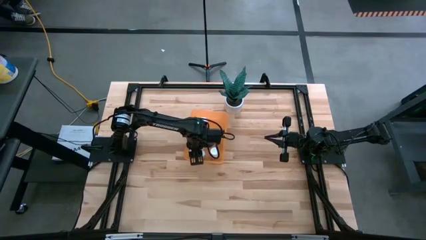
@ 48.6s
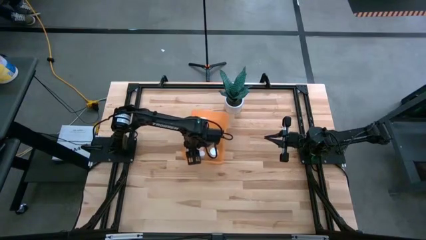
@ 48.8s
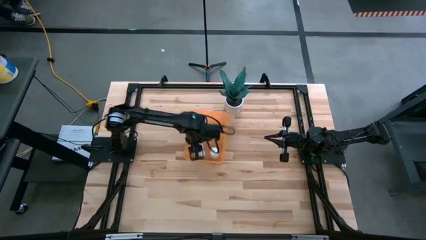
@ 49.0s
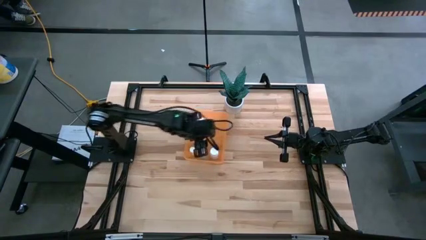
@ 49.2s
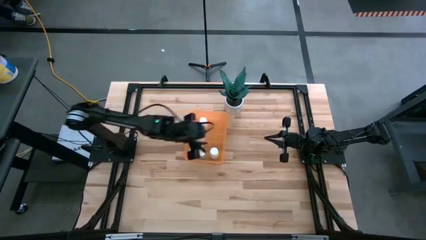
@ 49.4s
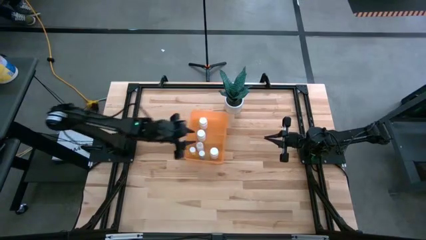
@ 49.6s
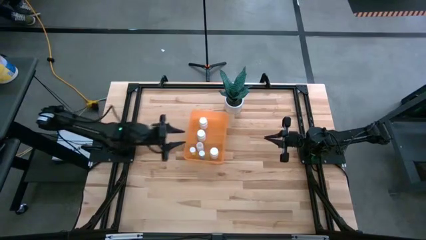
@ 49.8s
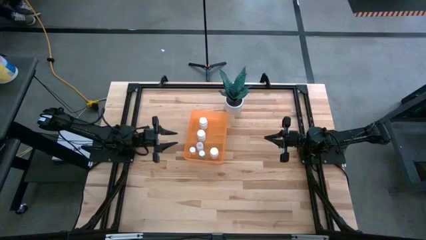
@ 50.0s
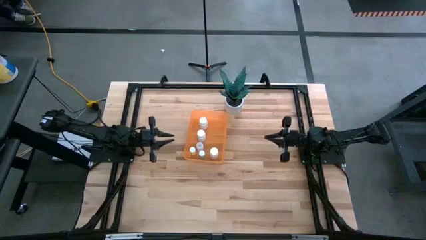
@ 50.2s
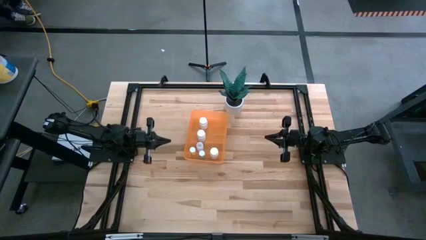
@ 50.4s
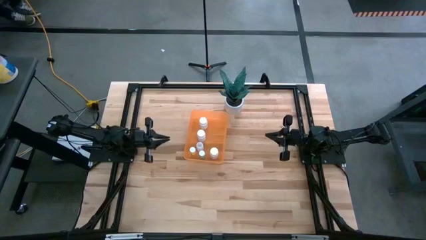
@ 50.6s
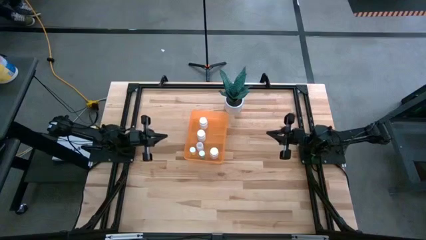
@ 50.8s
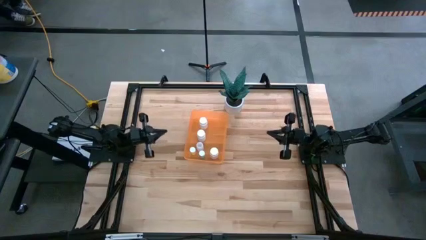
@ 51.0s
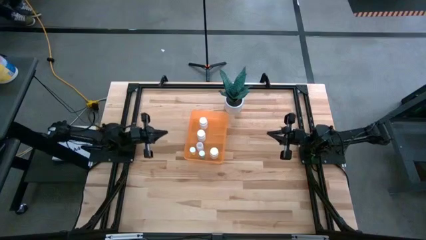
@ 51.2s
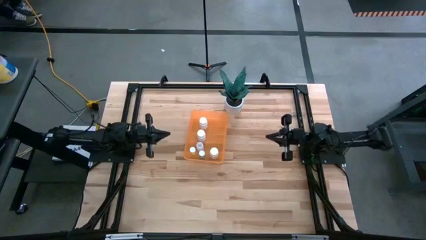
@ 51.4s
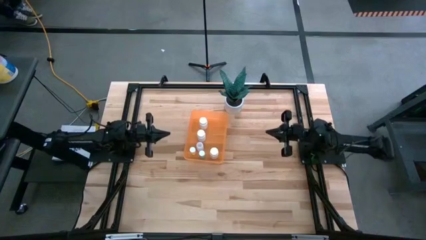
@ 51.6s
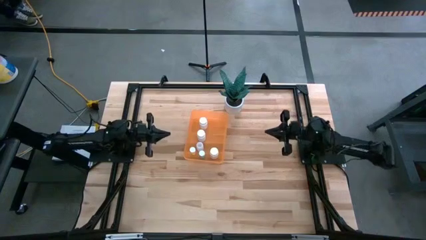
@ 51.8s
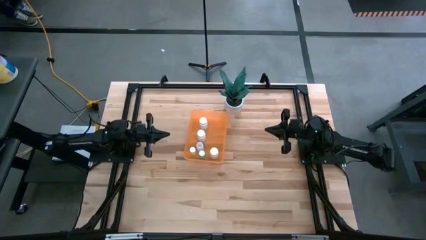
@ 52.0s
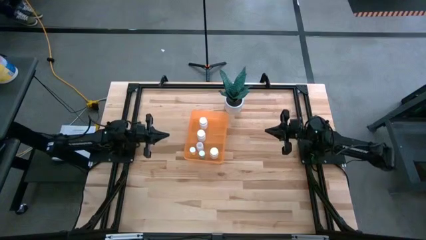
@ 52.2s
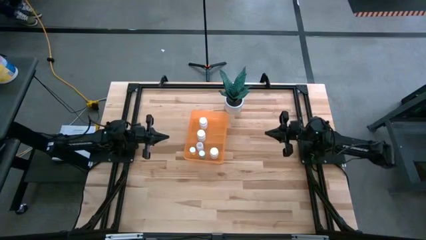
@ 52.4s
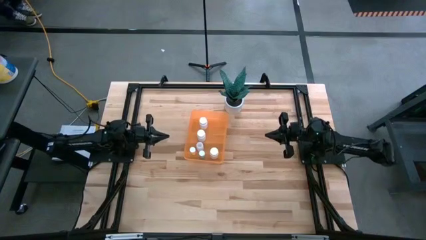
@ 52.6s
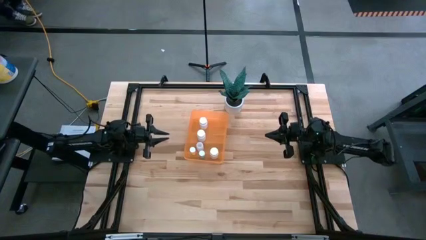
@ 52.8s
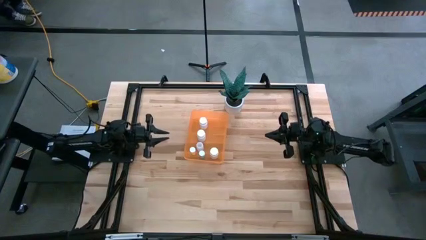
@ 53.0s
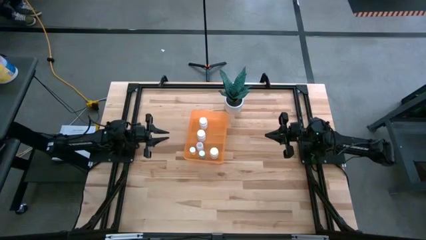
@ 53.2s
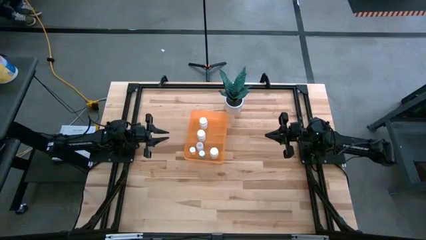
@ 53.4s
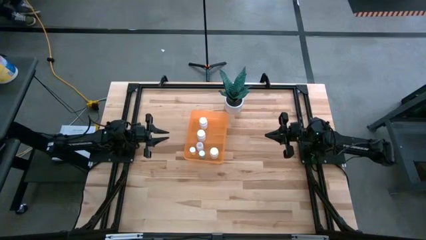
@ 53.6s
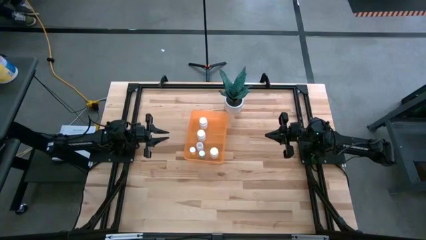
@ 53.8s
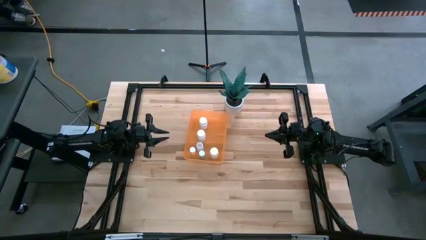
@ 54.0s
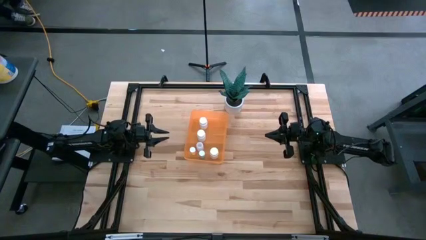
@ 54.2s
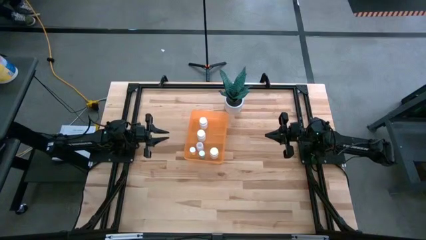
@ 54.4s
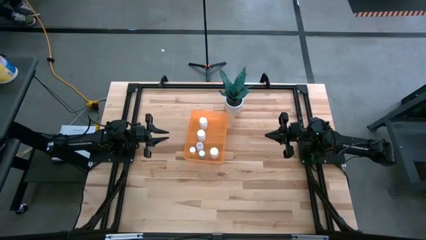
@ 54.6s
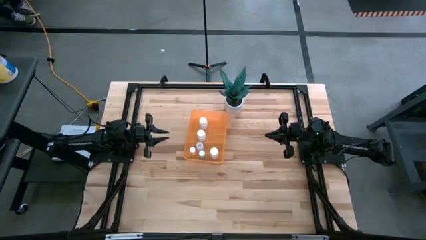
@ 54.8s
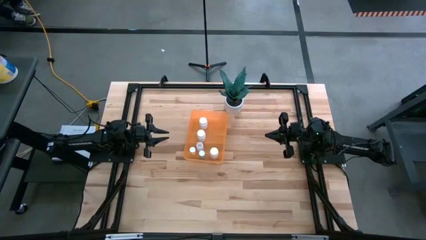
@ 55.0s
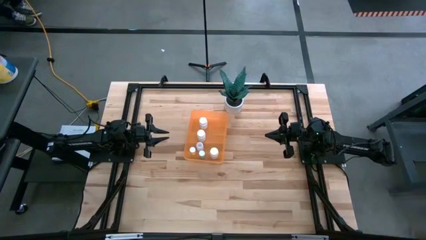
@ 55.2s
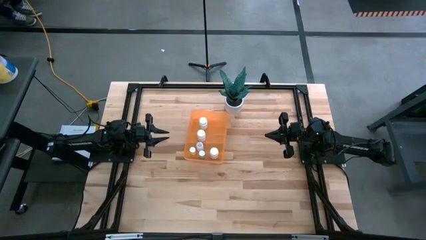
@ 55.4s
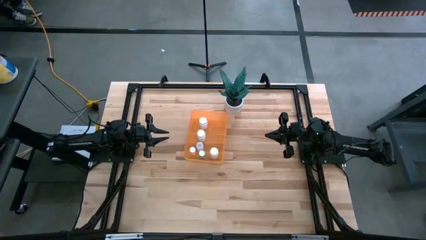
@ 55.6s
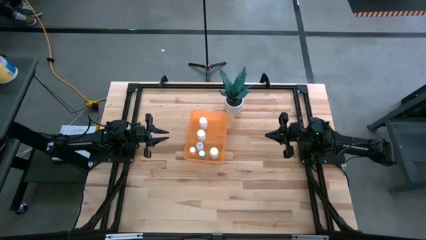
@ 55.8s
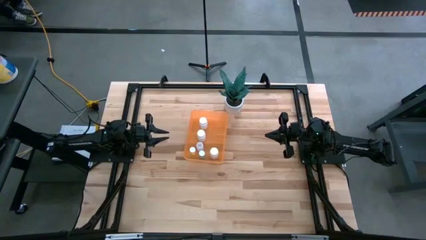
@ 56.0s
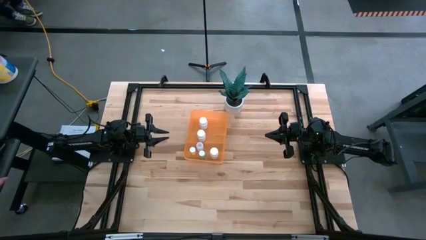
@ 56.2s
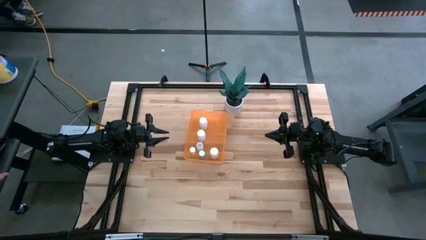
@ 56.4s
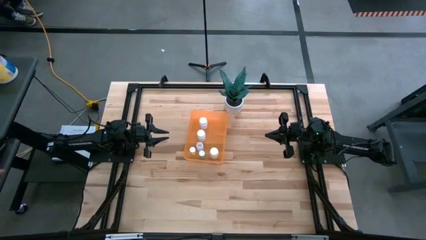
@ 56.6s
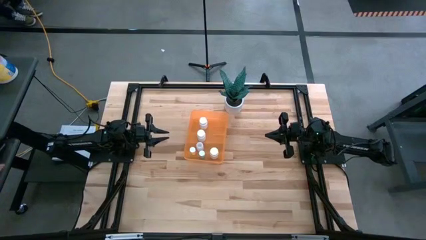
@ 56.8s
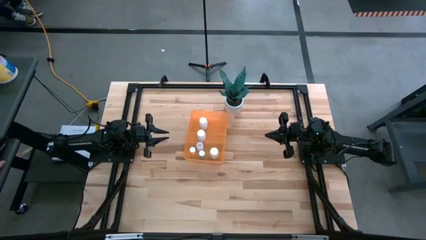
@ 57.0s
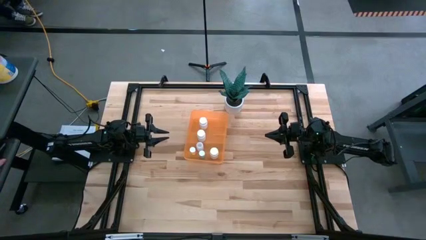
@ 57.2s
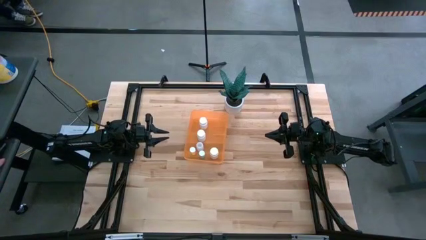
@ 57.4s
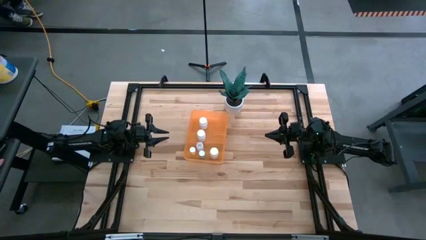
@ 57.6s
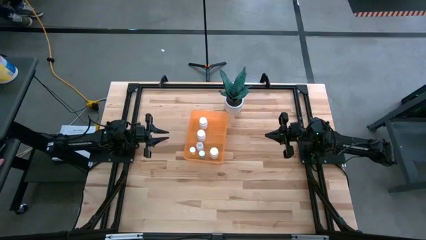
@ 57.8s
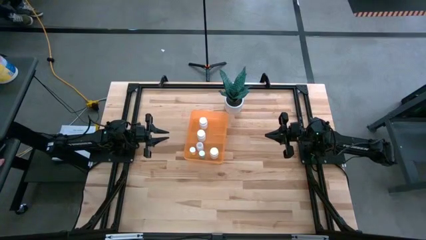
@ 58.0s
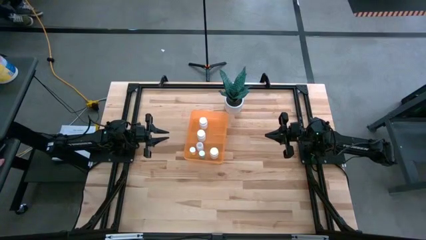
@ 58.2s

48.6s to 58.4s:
Task: Pick and place pill bottles into a basket
Return to Home Position

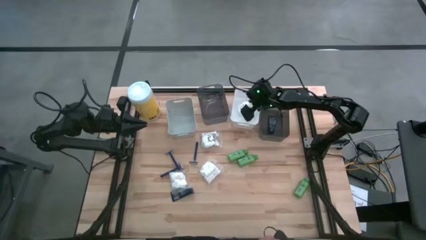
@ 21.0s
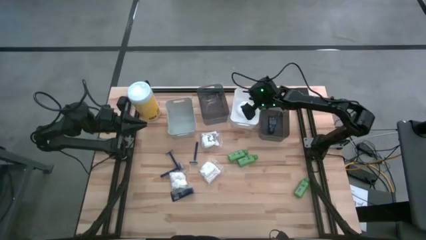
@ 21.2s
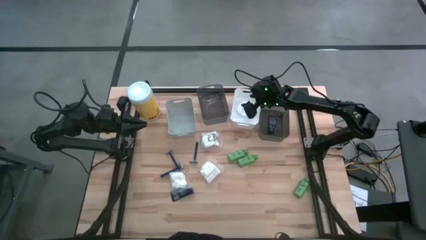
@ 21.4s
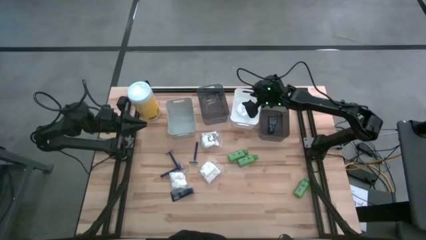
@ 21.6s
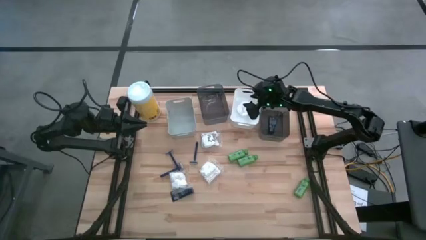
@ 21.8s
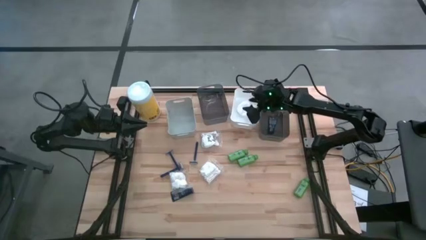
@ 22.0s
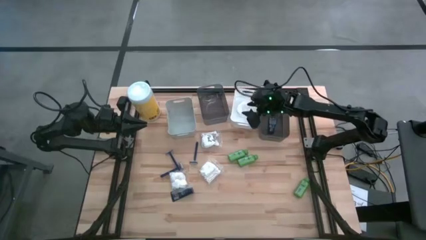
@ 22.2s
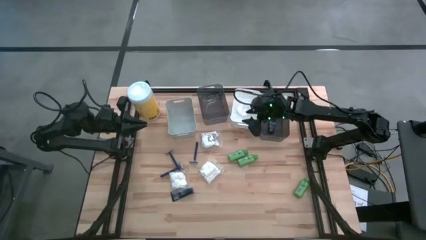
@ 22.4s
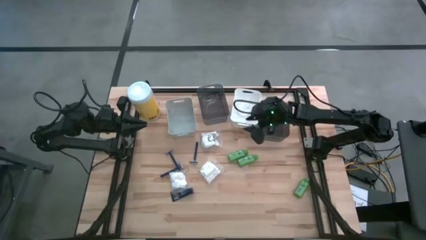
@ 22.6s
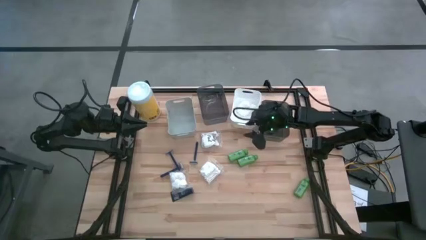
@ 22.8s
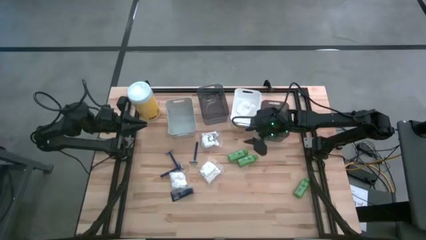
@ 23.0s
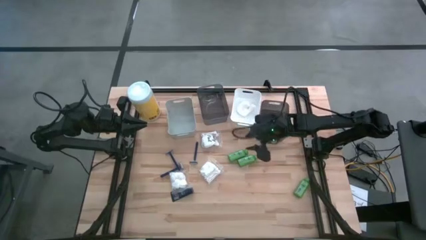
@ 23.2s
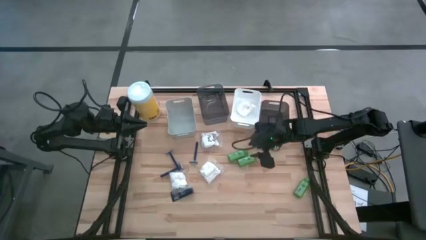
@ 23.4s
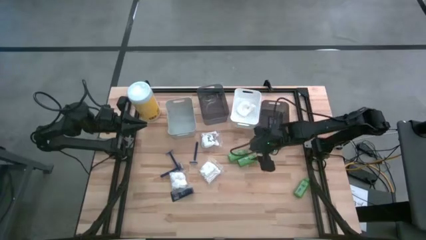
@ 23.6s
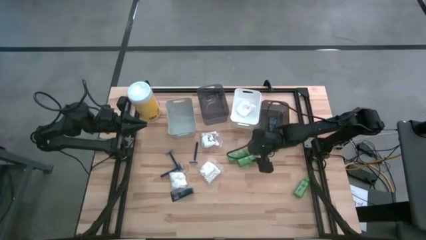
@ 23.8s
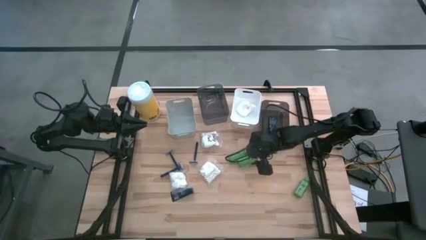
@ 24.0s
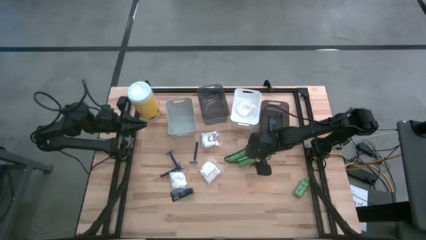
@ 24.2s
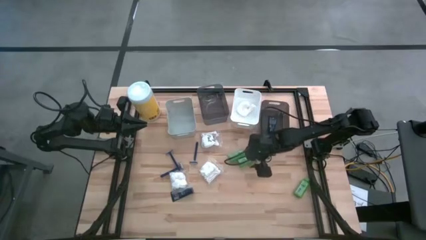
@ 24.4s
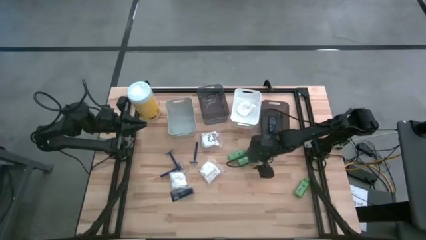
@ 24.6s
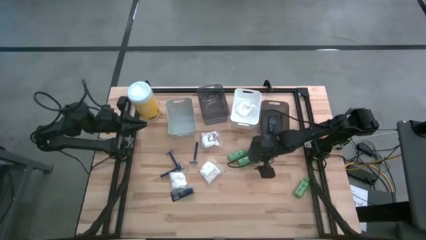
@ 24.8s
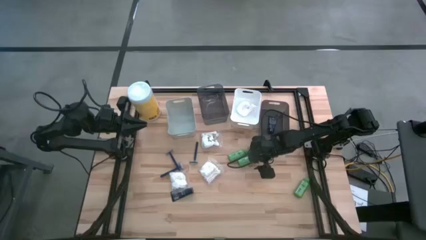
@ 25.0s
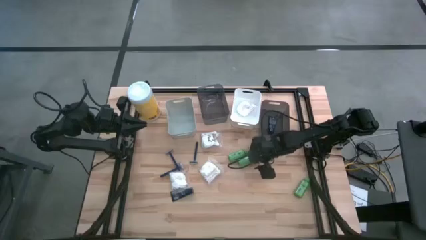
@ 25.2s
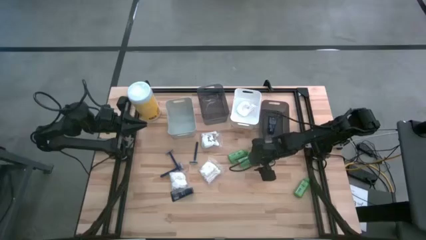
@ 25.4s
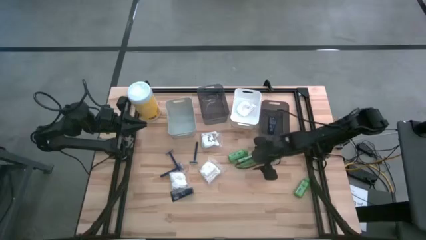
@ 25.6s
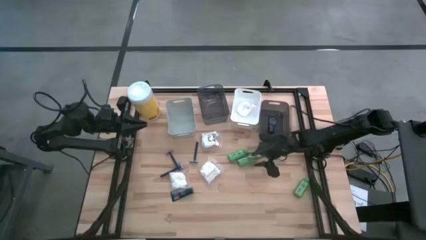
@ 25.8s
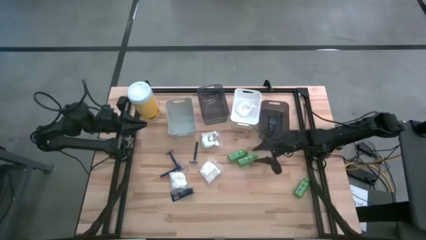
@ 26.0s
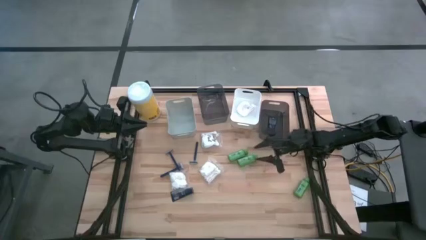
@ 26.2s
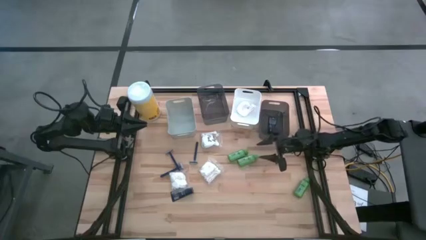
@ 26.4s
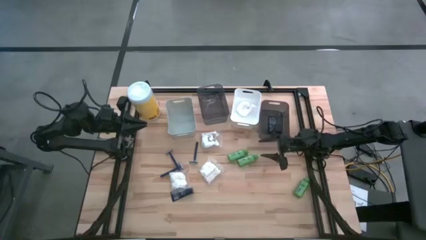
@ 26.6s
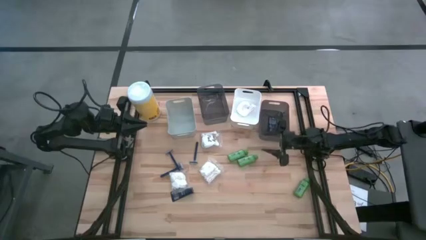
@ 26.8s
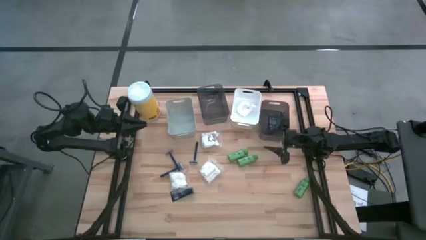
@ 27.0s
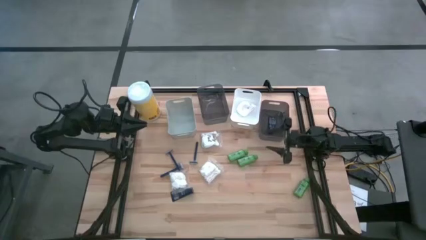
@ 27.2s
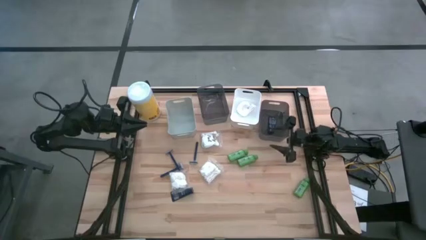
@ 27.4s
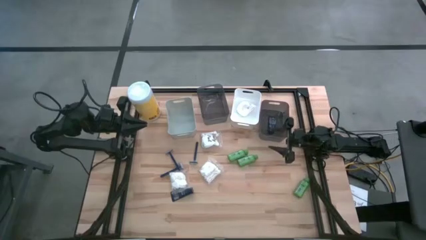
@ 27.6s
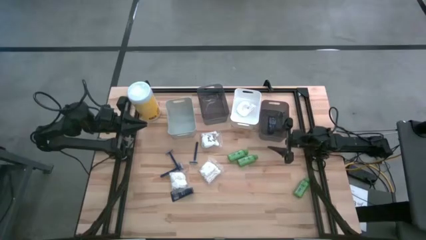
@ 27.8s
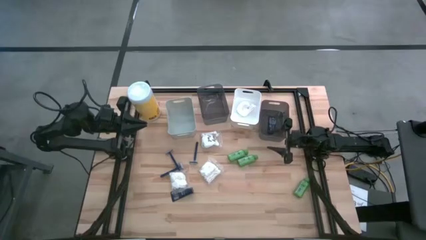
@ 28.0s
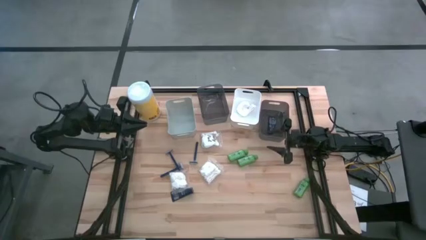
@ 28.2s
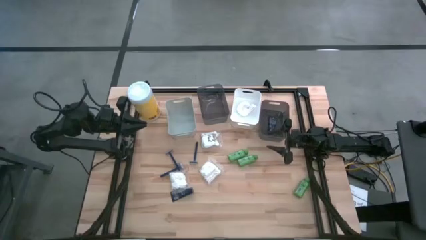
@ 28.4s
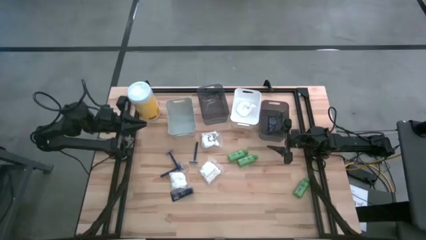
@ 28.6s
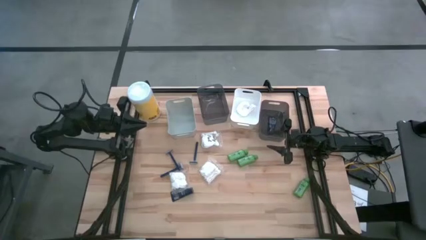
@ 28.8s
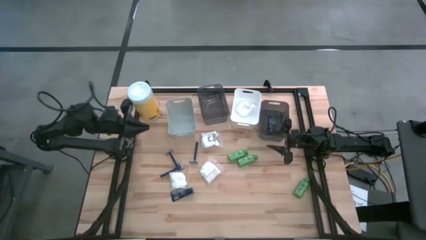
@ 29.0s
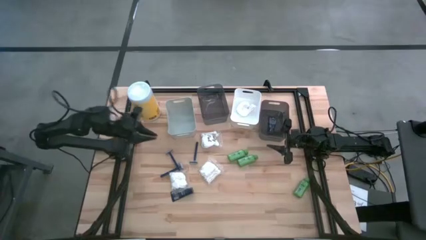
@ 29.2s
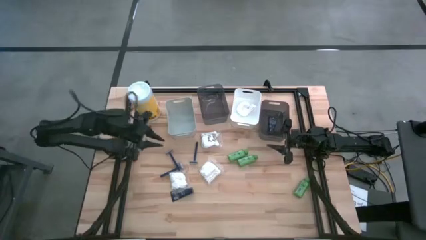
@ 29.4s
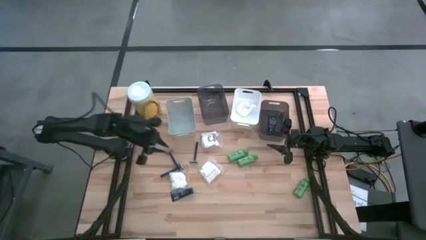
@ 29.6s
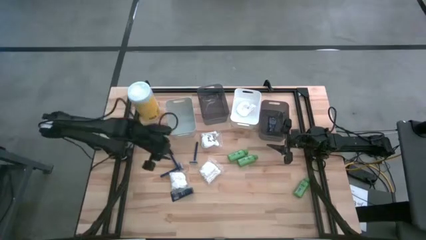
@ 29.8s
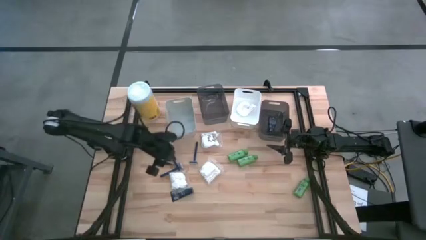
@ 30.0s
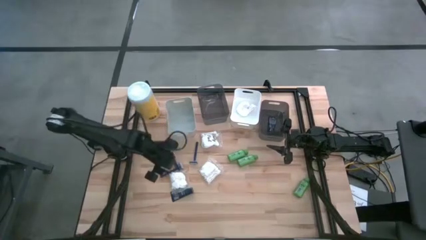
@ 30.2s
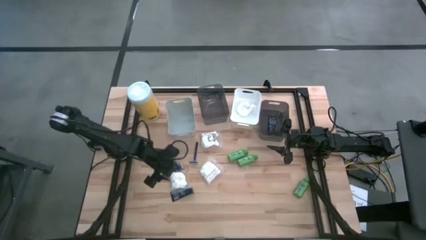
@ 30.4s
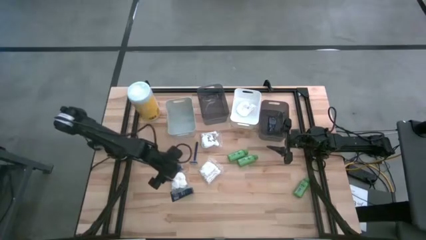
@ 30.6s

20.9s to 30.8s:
Task: Pick & Place Travel size toiletries
Put the white cotton pack into the white bin
